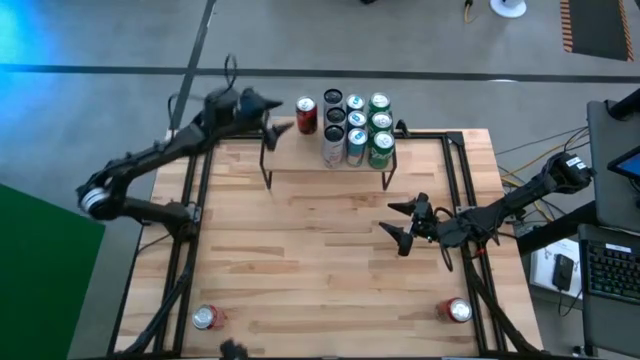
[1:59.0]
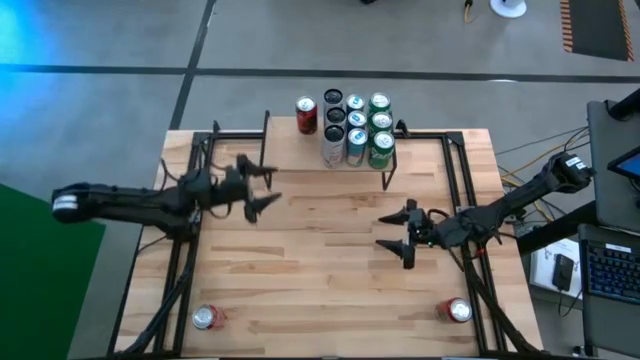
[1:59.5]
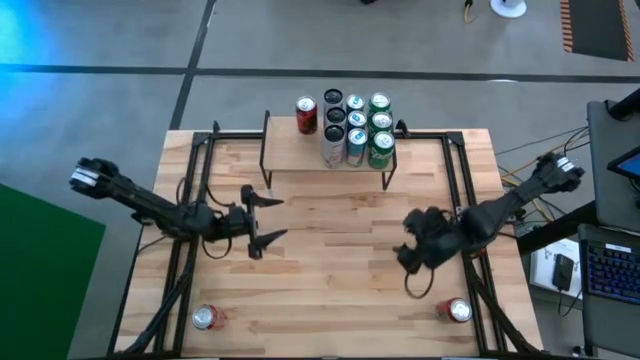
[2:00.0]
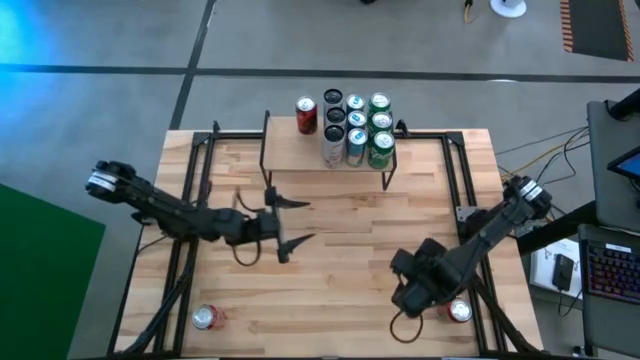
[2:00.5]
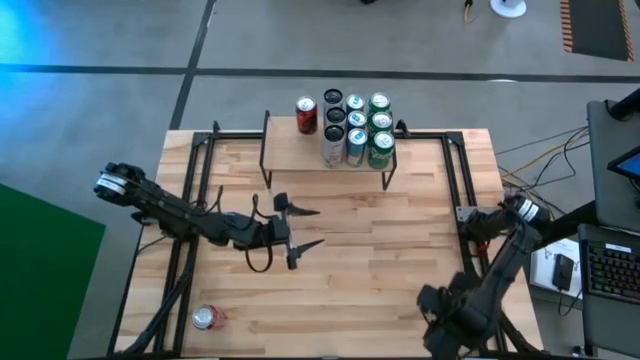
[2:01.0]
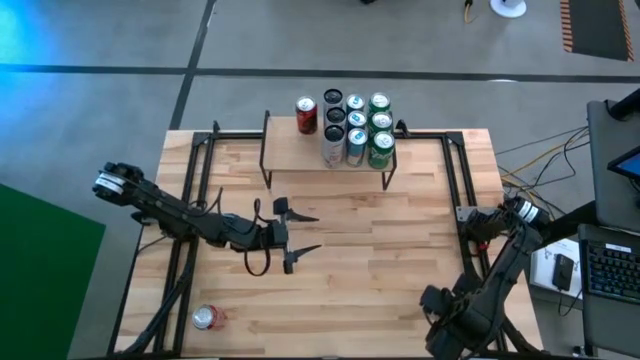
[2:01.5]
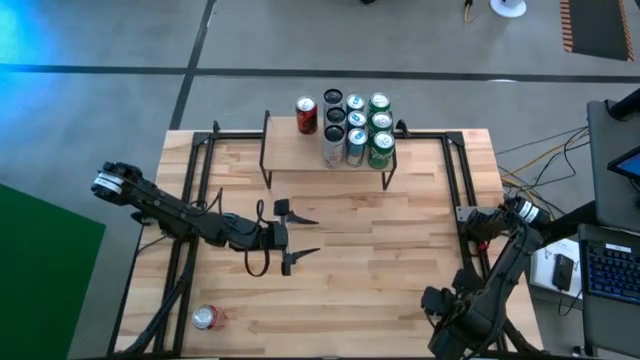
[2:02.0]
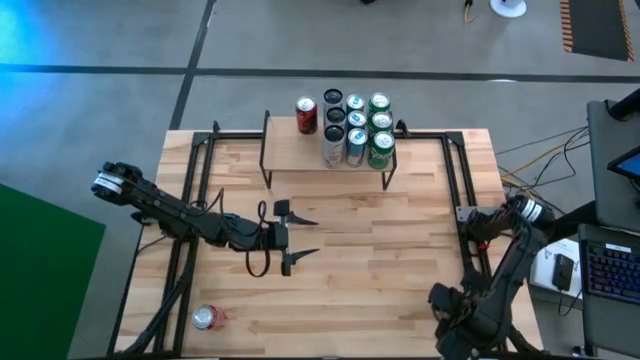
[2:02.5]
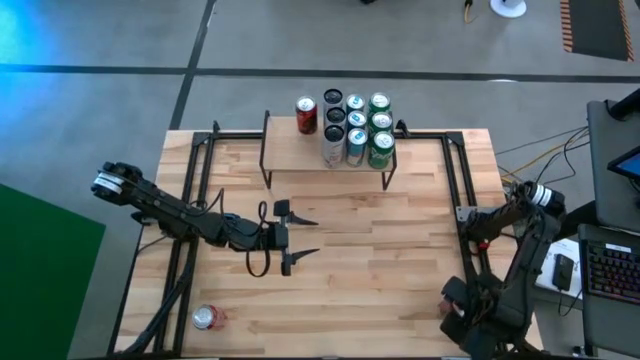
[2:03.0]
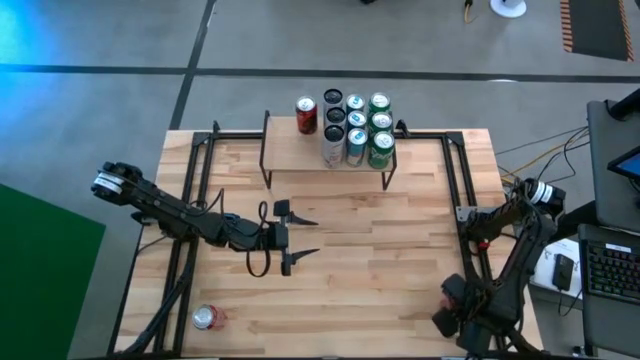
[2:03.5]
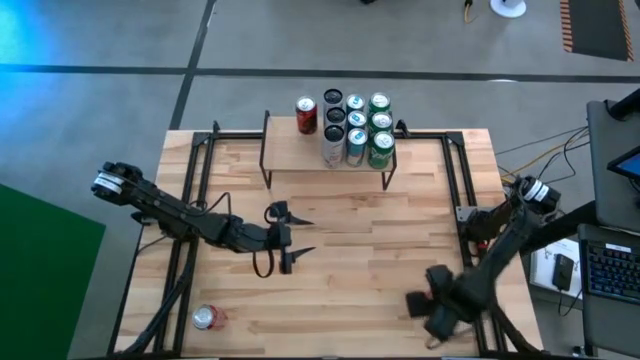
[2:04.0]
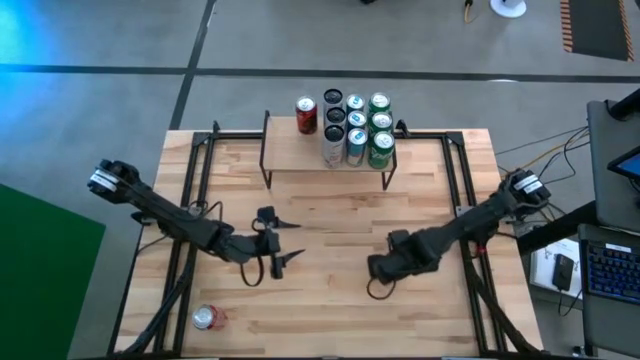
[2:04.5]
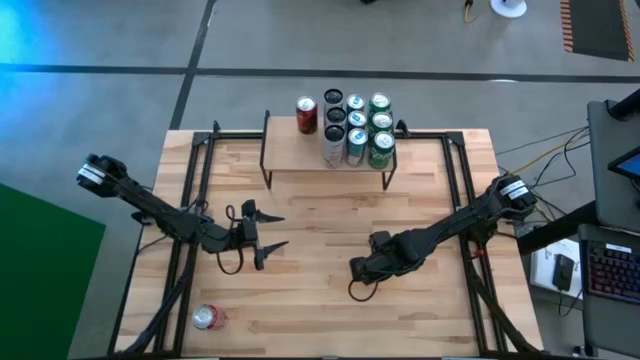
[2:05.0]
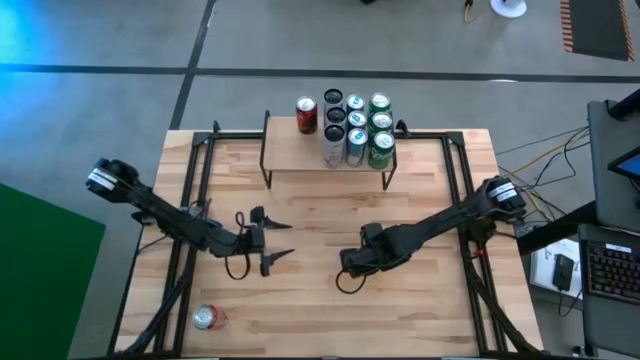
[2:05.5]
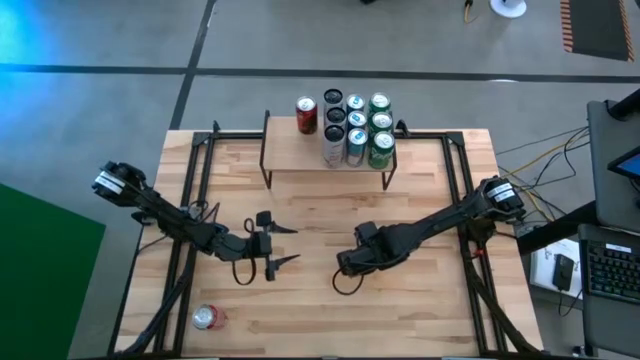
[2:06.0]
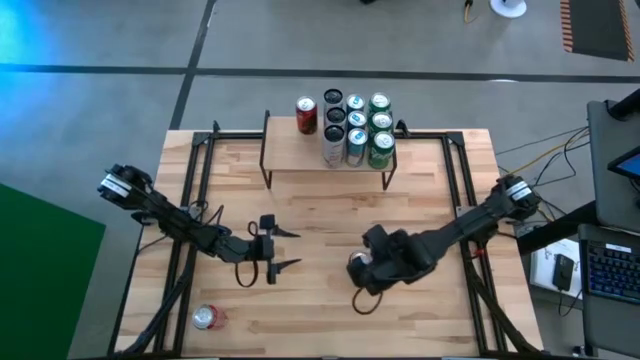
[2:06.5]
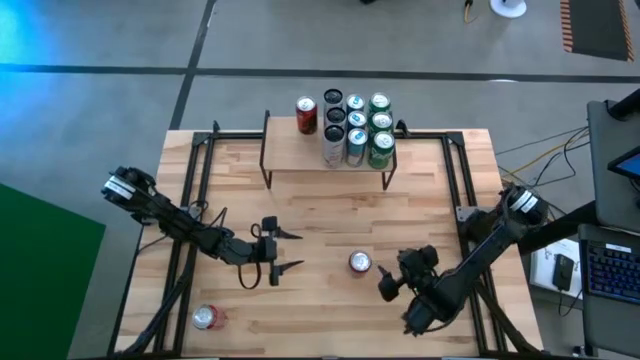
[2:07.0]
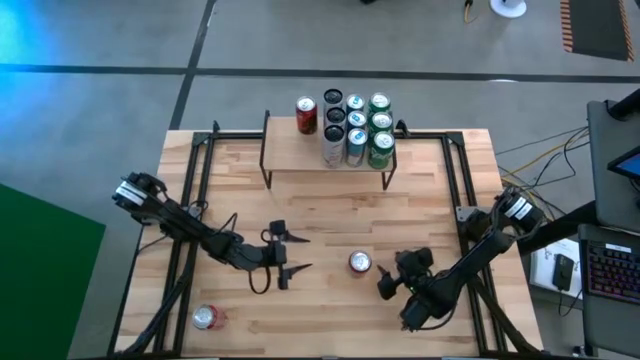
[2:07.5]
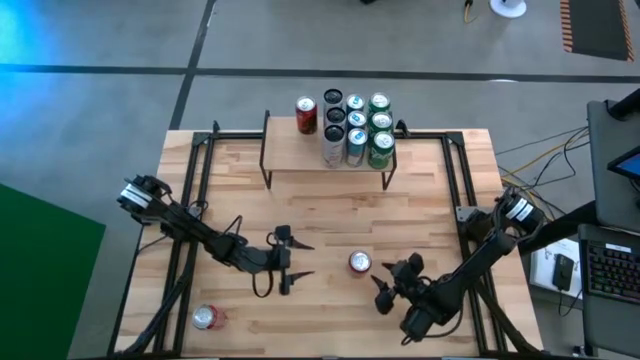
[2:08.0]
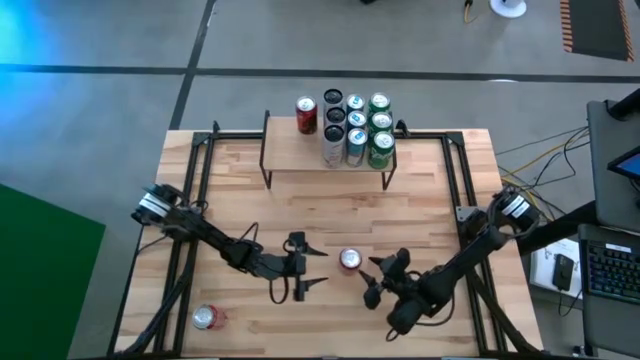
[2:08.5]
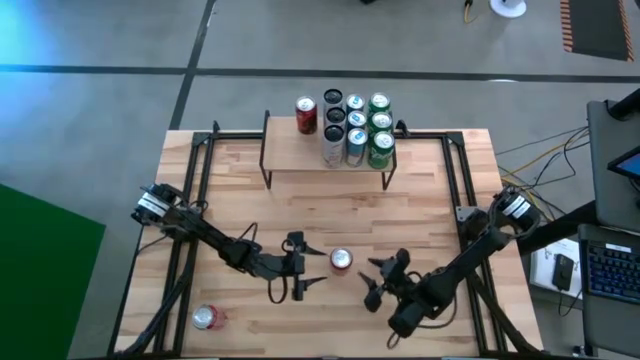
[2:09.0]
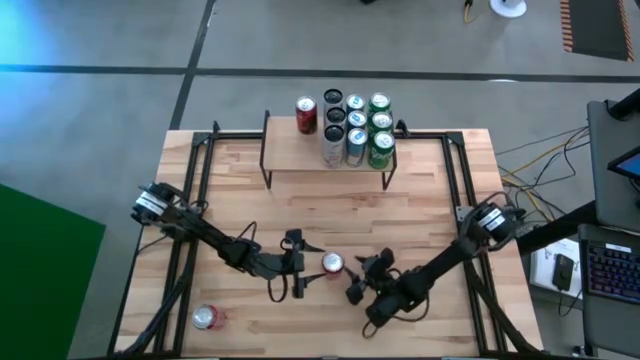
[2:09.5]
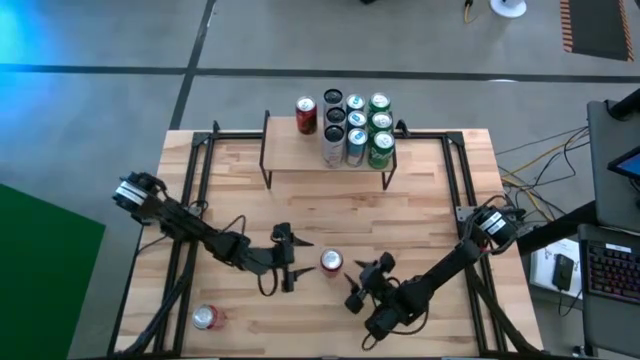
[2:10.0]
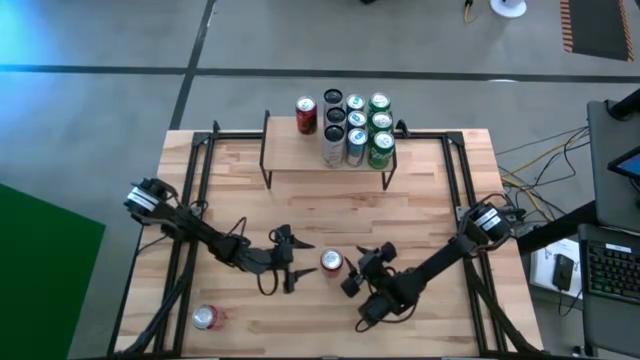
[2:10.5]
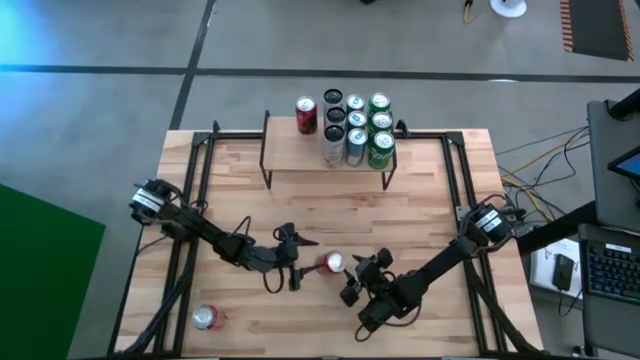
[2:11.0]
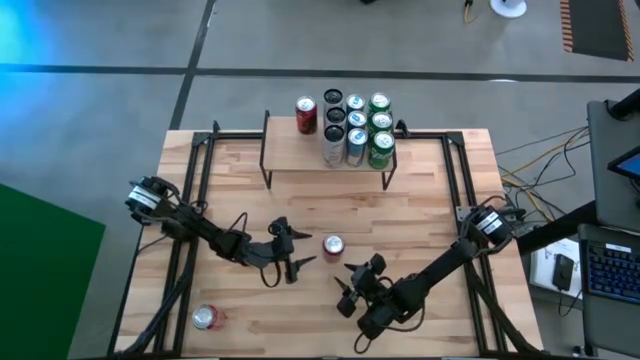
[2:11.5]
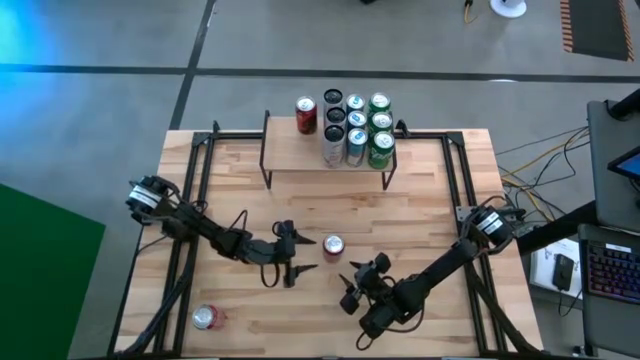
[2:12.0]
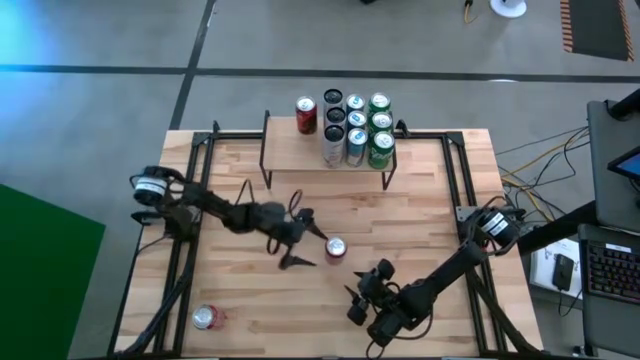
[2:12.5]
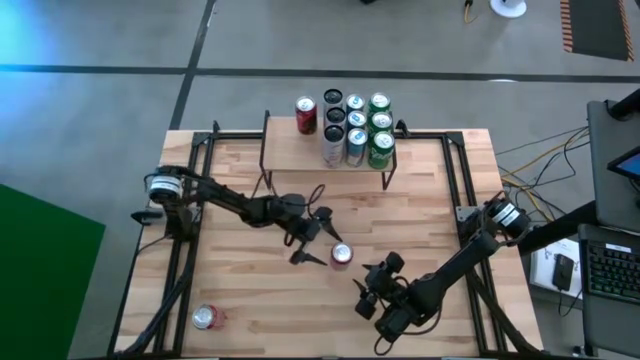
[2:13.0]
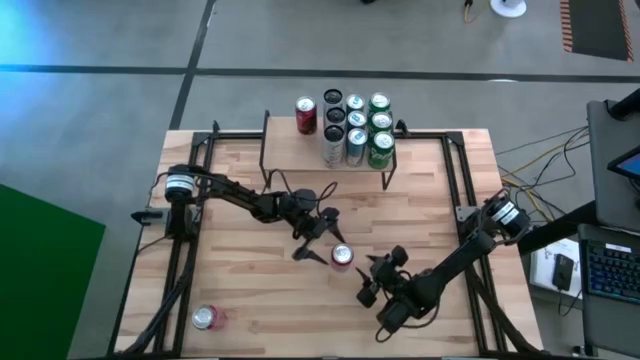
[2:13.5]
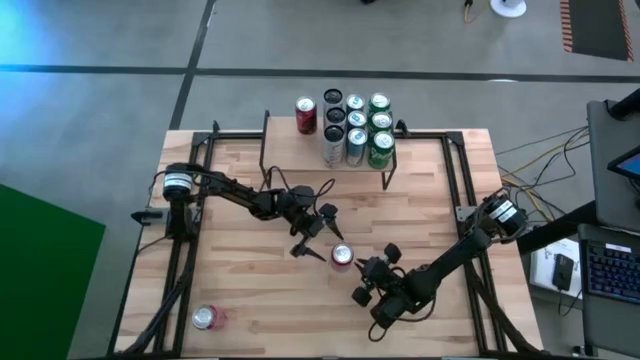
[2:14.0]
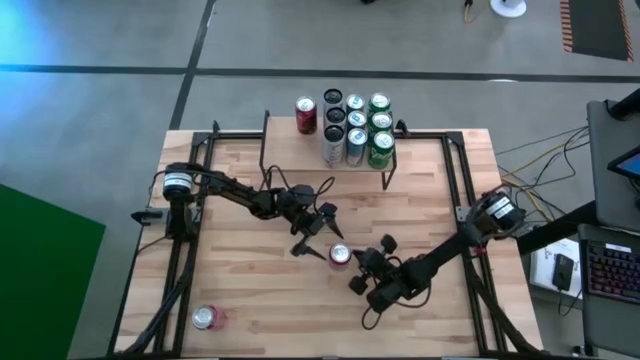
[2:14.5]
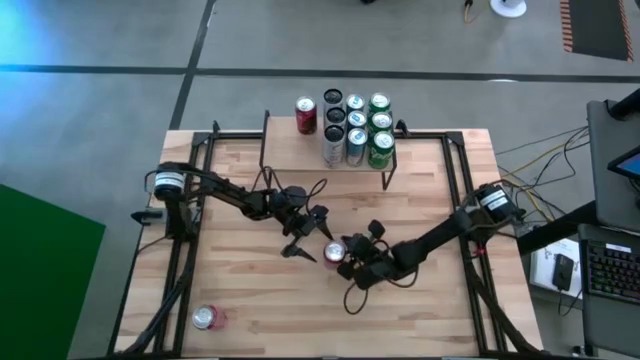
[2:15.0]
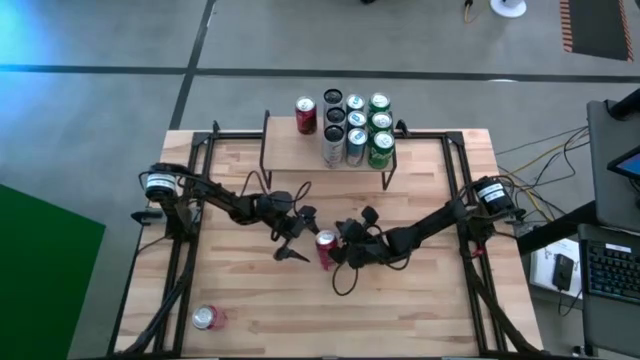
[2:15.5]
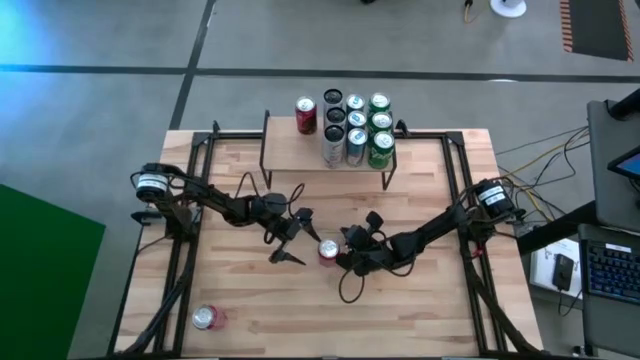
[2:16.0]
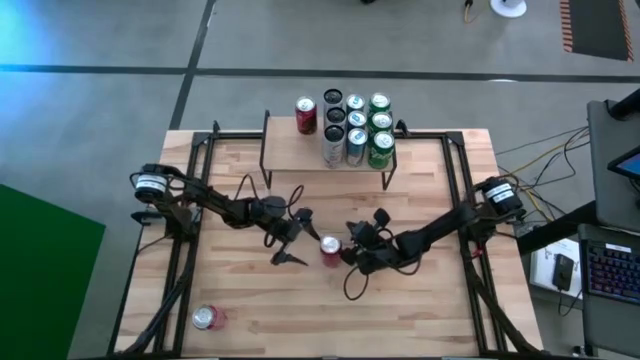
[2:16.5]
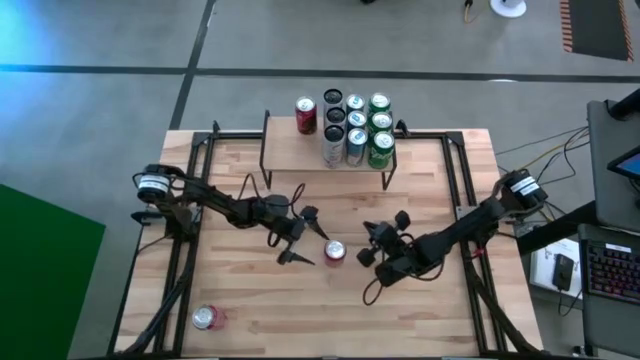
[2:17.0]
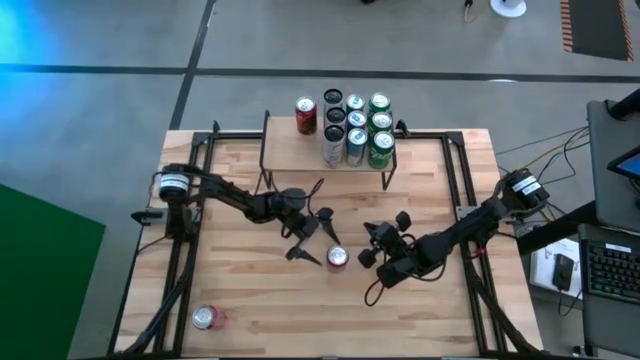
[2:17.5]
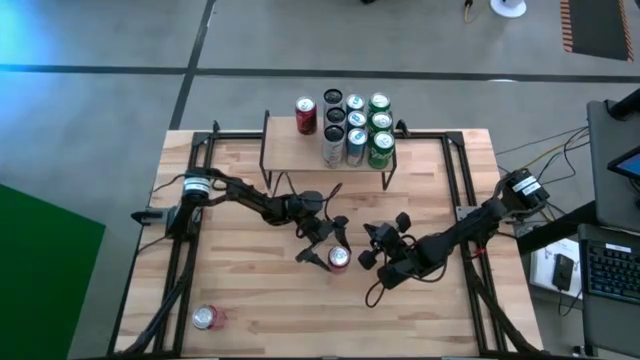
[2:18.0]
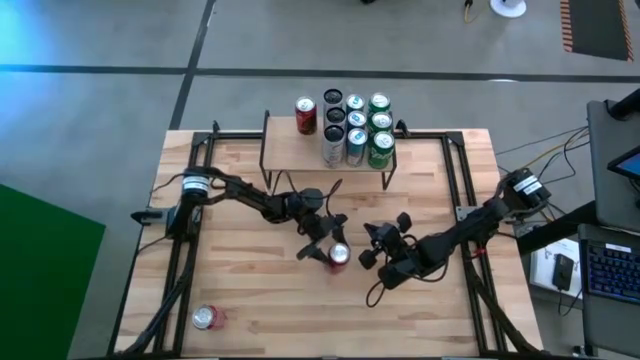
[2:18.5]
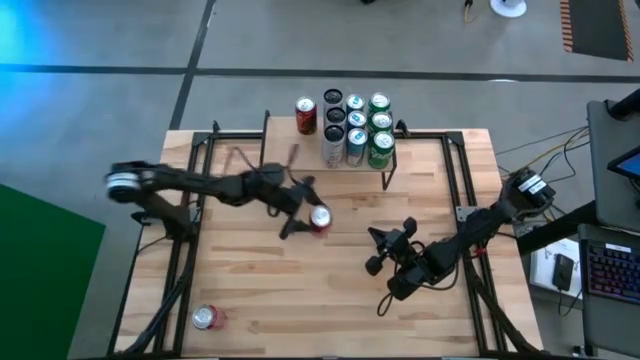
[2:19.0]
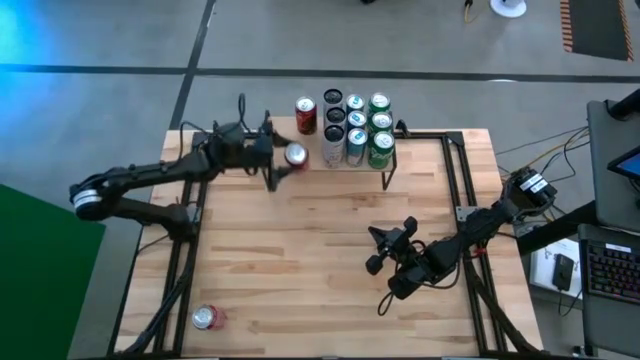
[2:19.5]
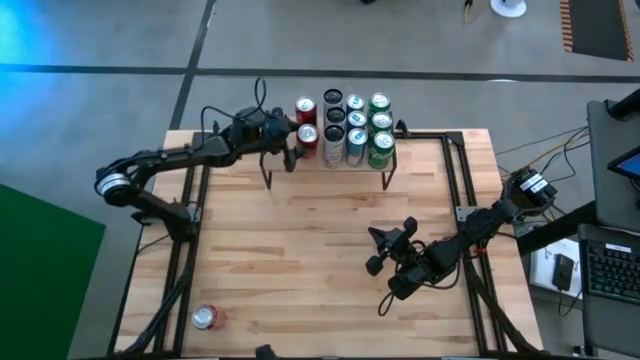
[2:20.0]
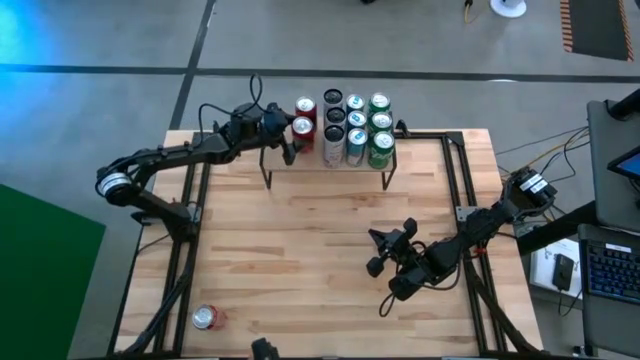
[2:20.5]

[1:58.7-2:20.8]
Task: Place canned beverage on shelf
Put the right red soda can on the shelf aligned with the other red soda can

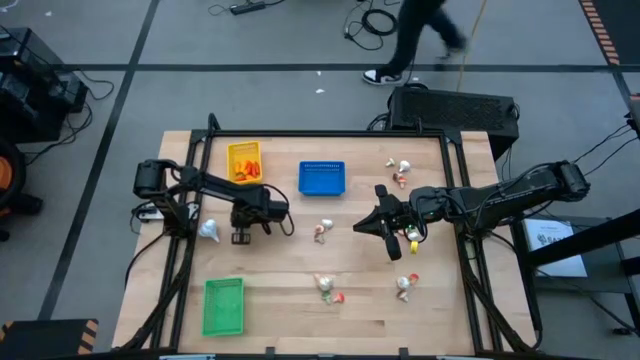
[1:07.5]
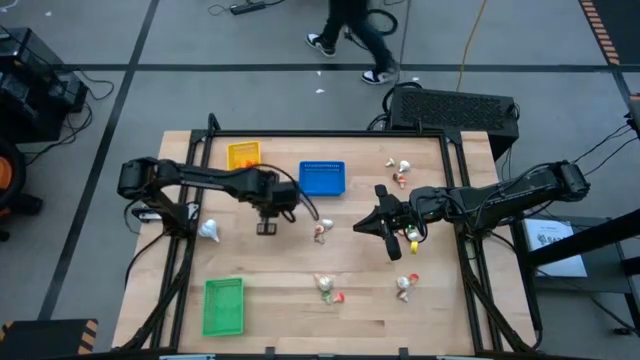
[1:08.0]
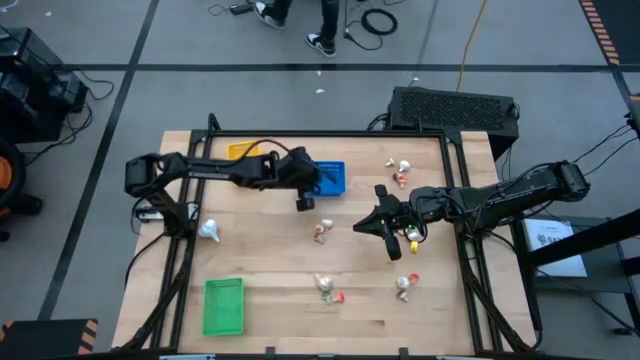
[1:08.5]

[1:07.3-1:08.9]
Task: Sort produce into baskets
Put the left brown mushroom into the blue bin
